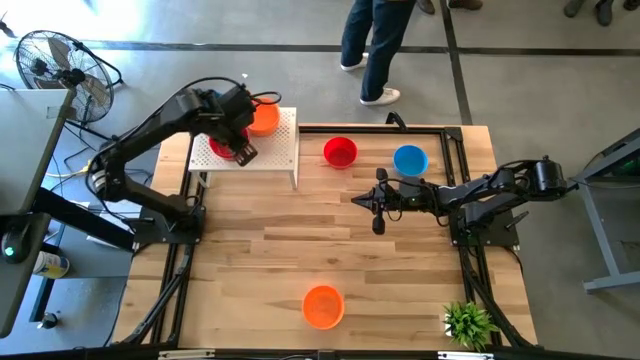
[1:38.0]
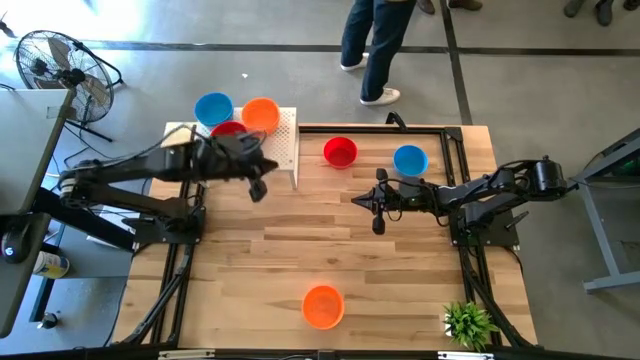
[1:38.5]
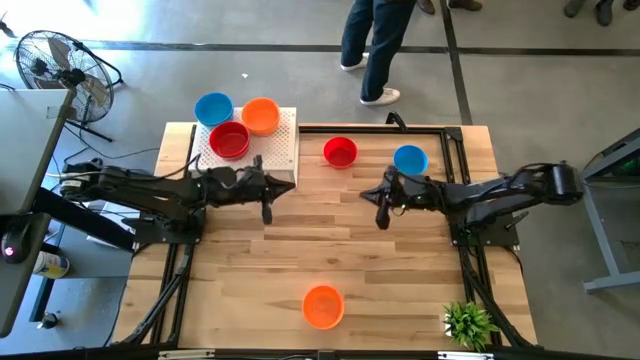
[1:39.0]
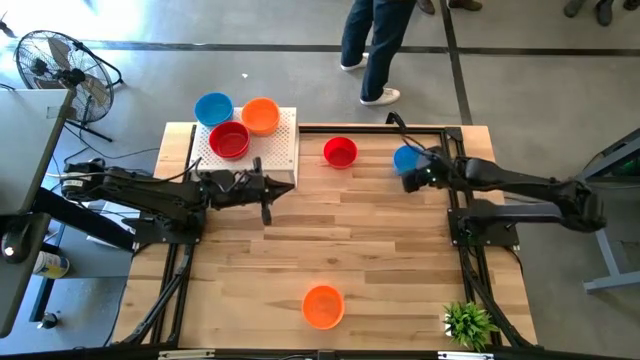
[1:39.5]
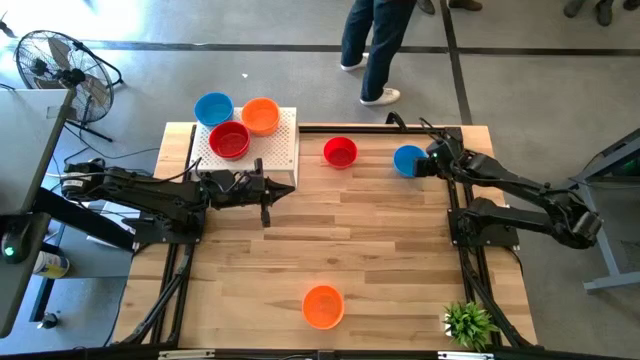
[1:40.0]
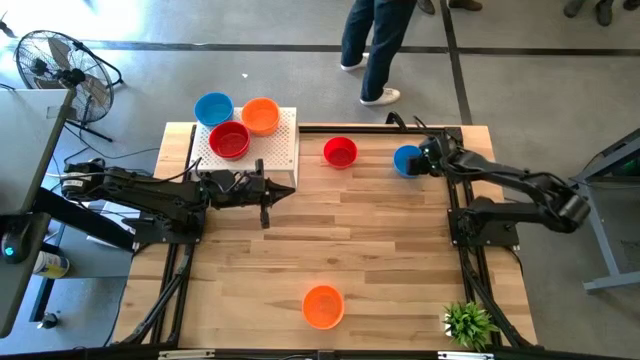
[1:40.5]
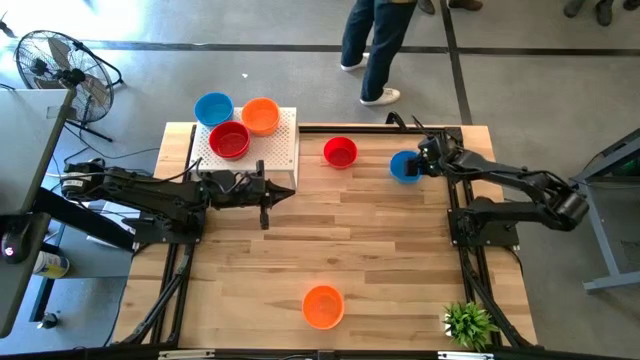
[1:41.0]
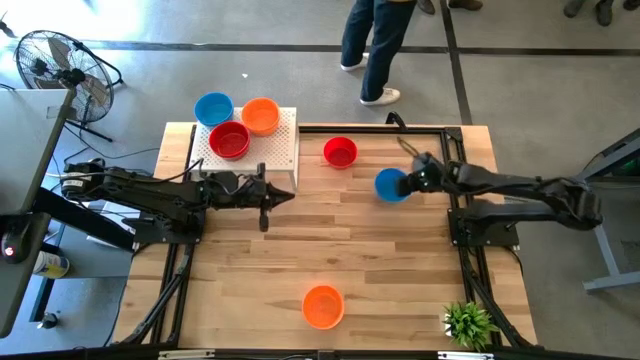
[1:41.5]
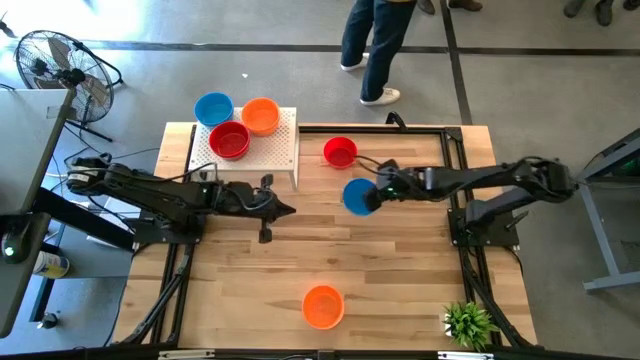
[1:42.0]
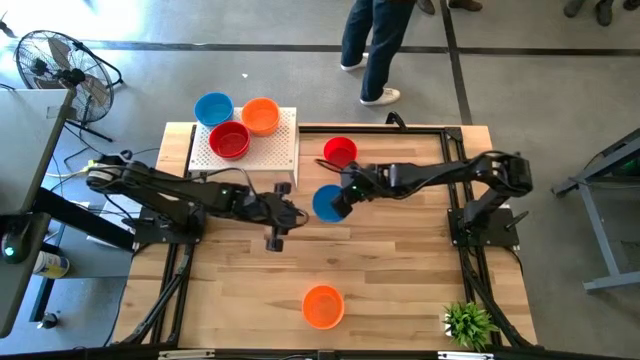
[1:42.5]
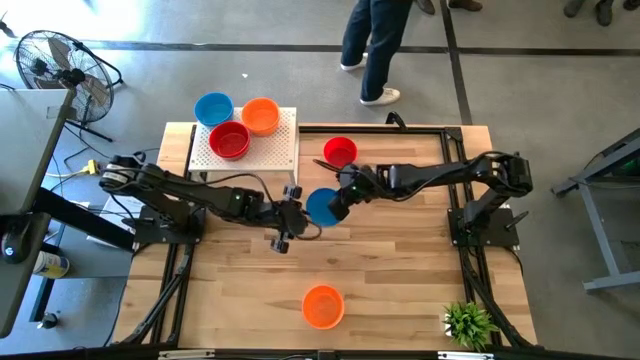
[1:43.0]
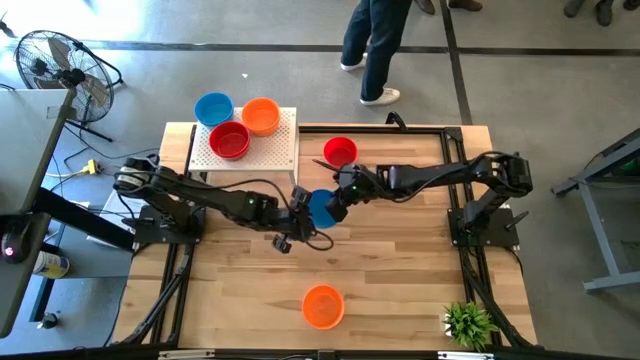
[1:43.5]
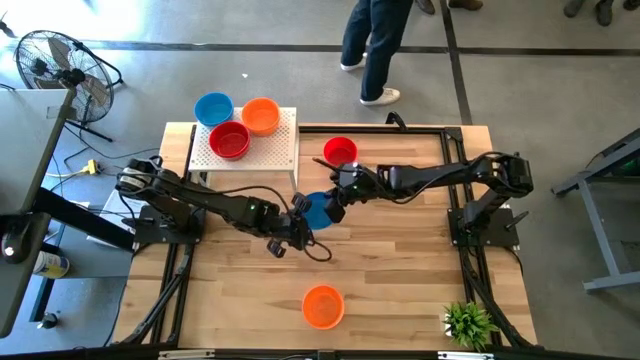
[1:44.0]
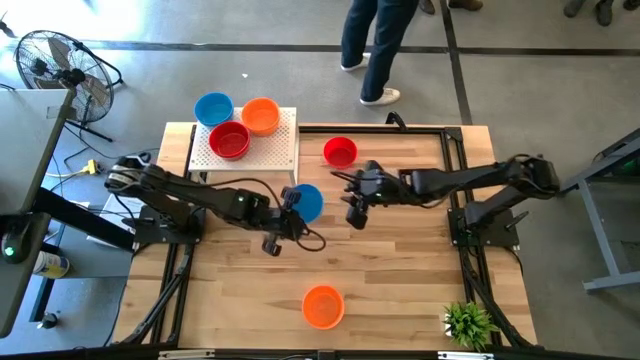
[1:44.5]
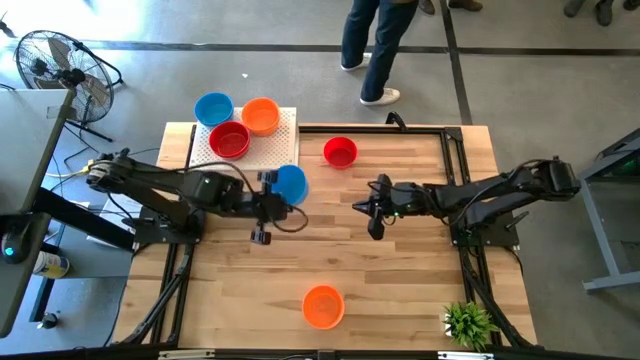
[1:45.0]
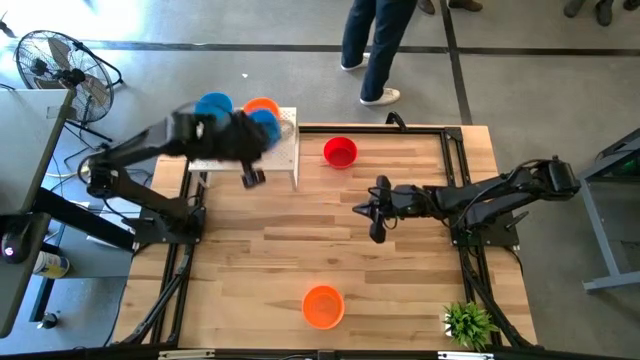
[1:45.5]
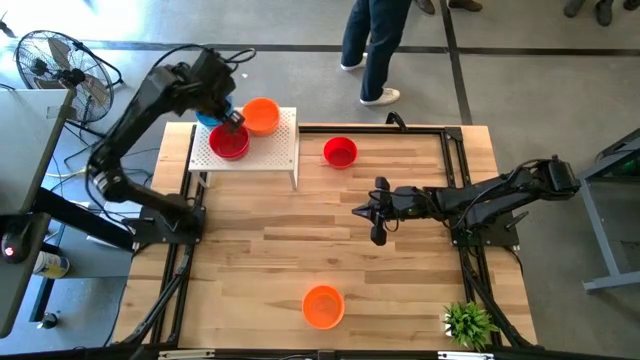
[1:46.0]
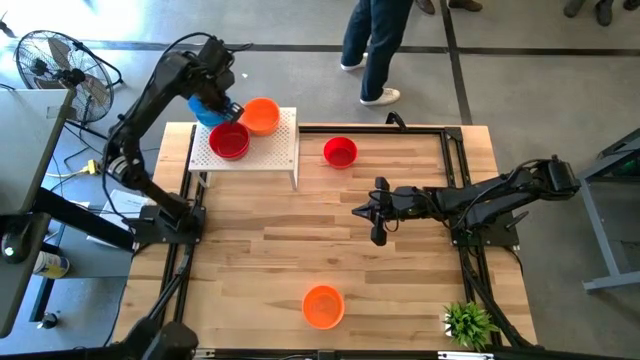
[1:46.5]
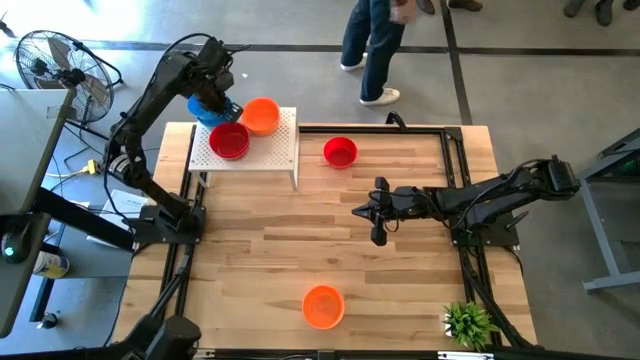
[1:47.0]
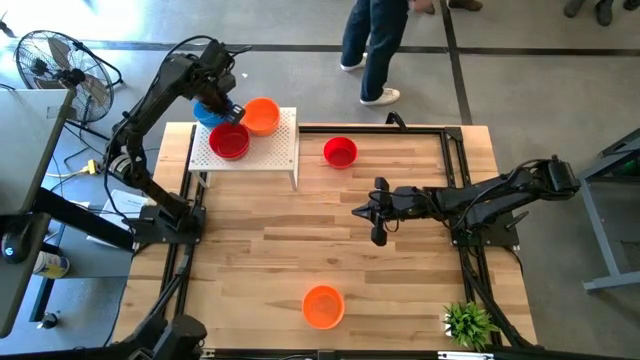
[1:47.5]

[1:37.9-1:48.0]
Task: Pick & Place Mini bowls
Stack the blue bowl on top of the blue bowl on the shelf

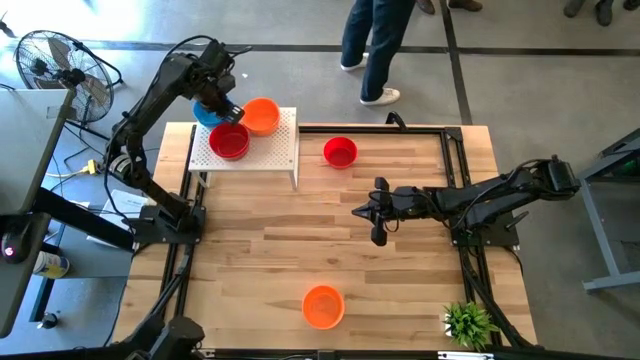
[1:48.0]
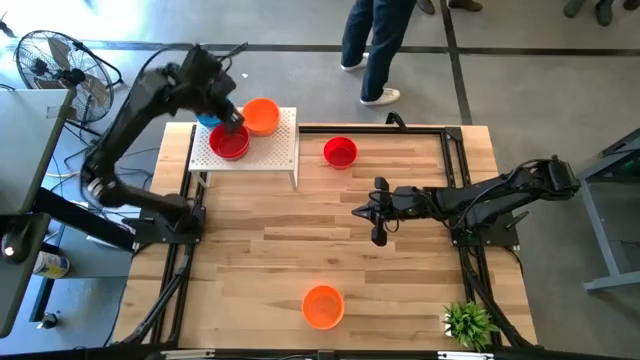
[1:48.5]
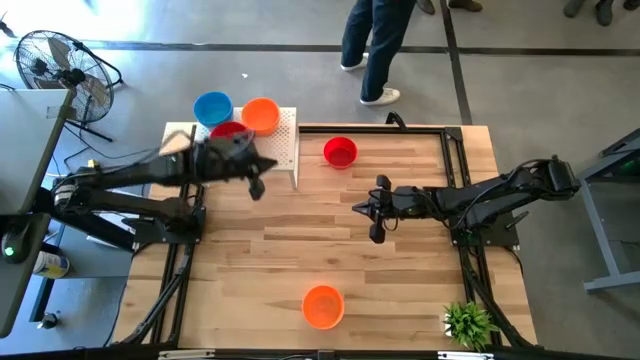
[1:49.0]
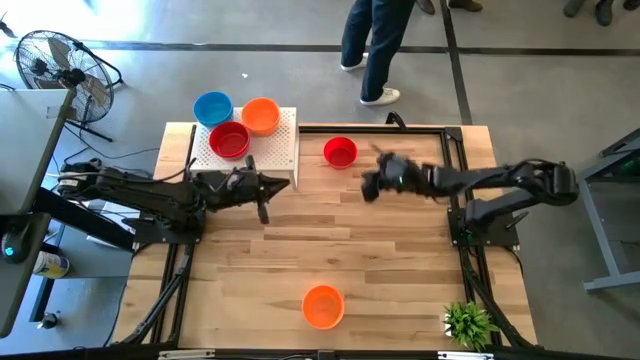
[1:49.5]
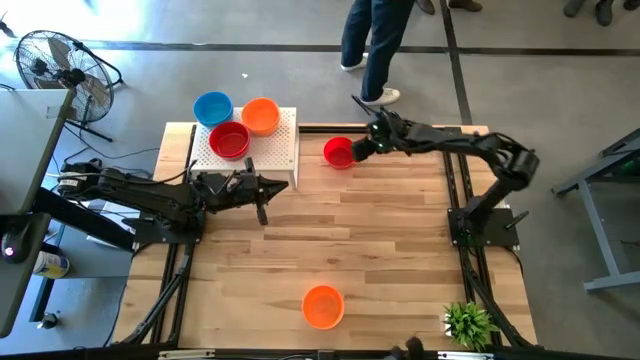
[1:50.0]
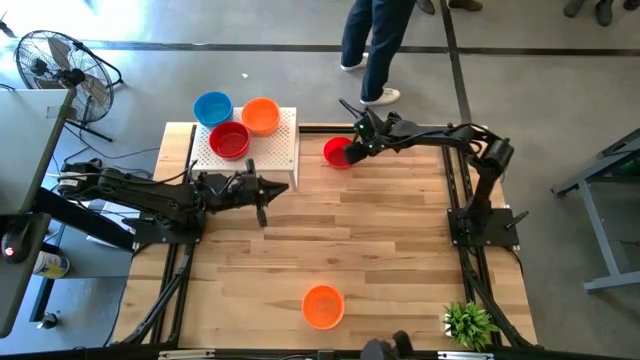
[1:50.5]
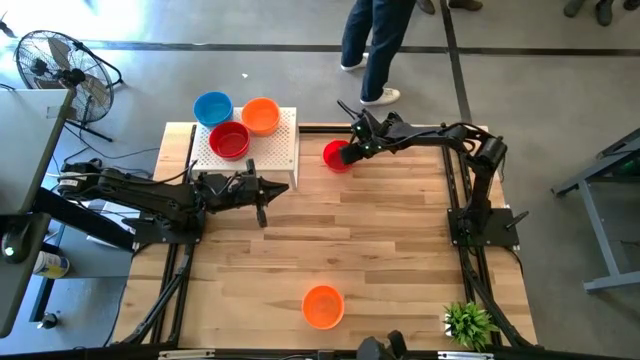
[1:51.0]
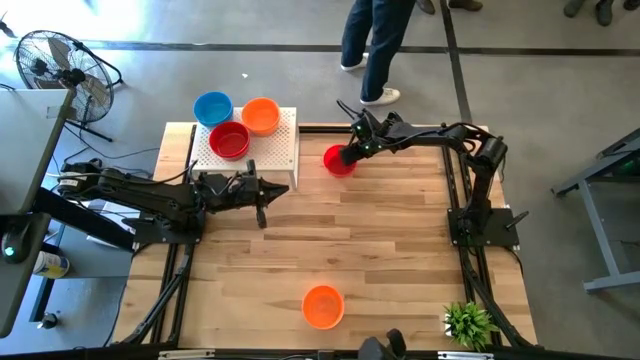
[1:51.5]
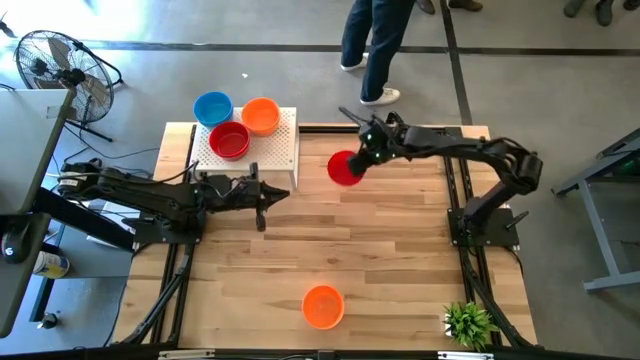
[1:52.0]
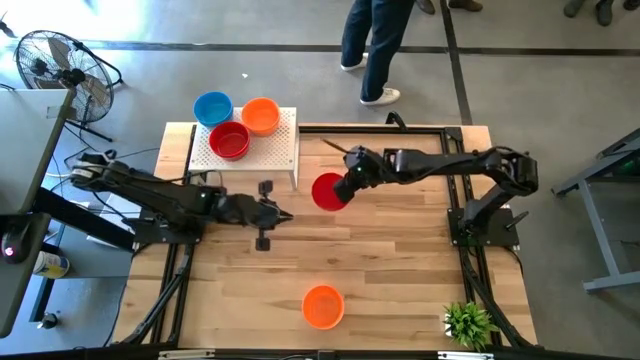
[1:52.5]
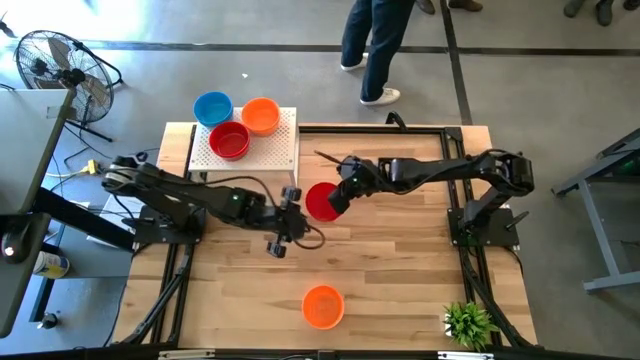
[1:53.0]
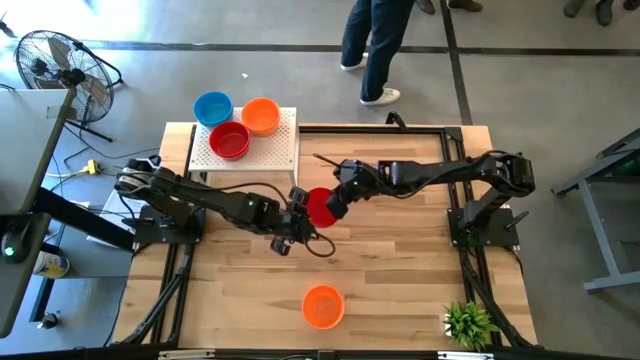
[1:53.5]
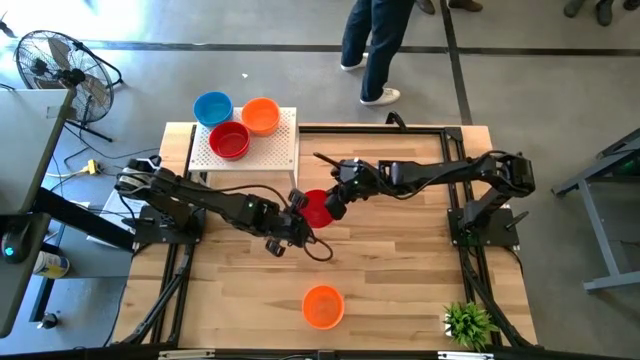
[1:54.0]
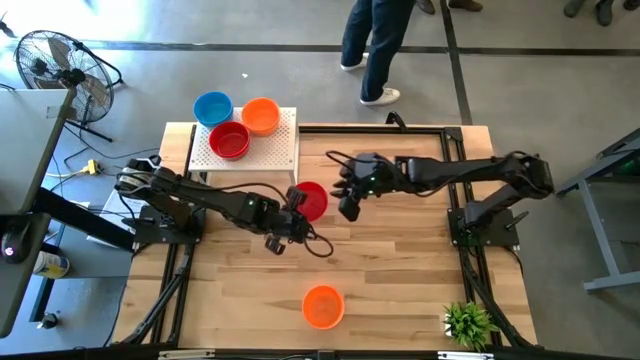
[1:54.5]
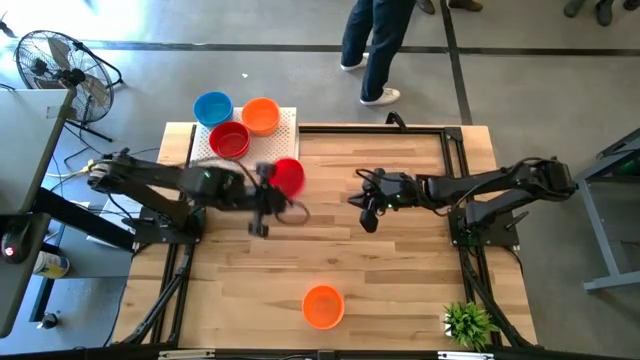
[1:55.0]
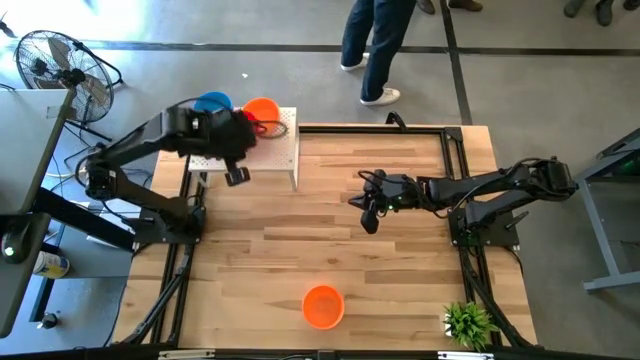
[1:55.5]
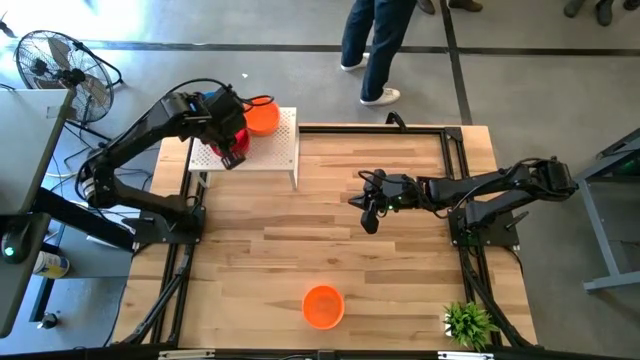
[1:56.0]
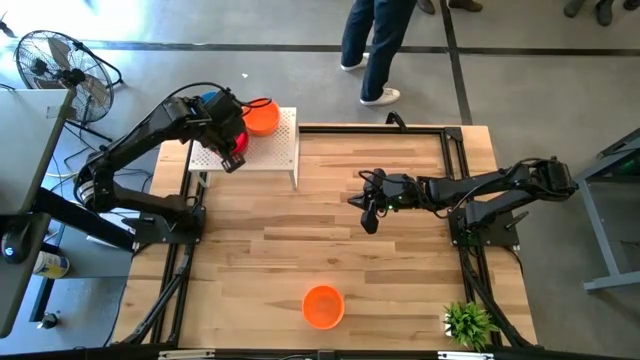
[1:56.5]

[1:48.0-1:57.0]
Stack the red bowl on top of the red bowl on the shelf

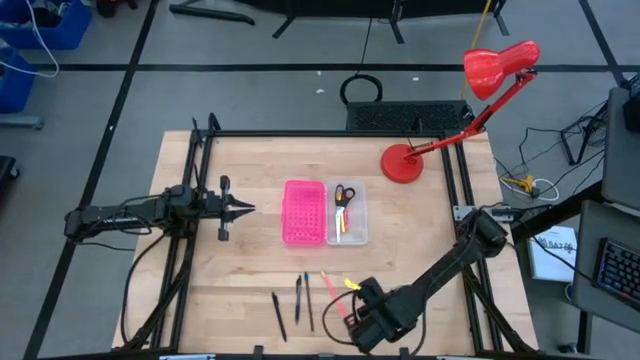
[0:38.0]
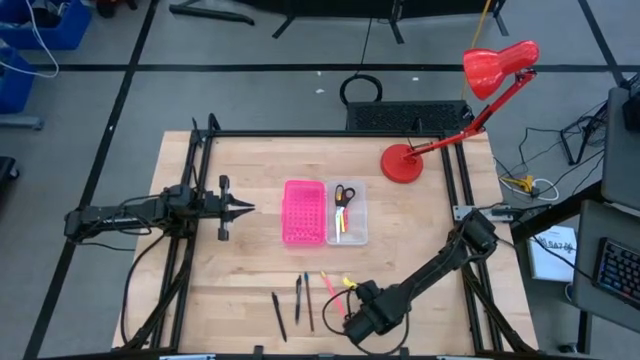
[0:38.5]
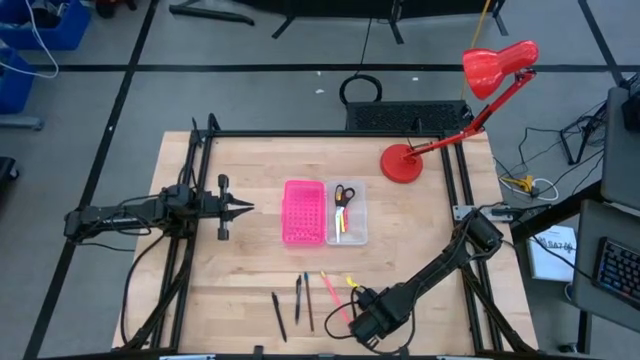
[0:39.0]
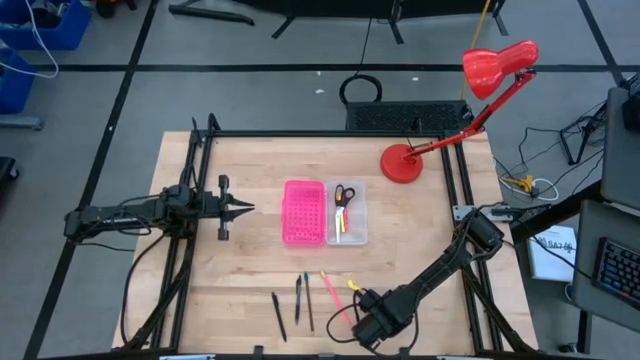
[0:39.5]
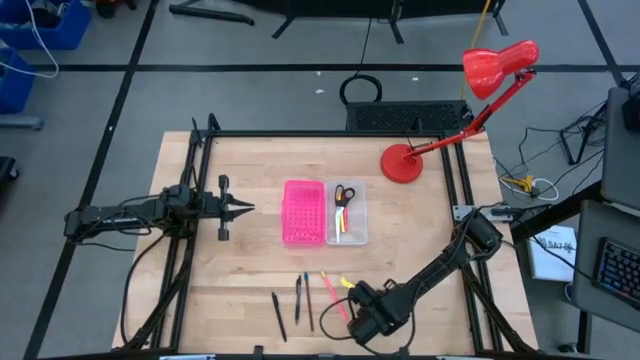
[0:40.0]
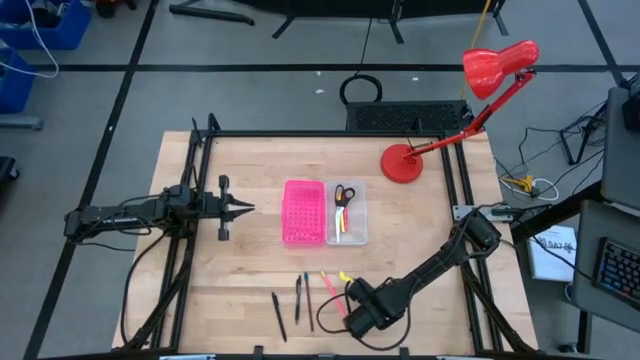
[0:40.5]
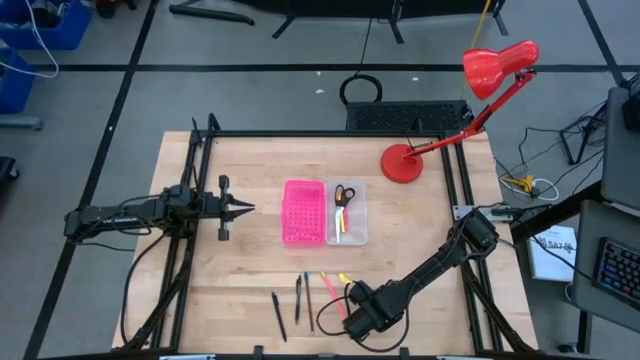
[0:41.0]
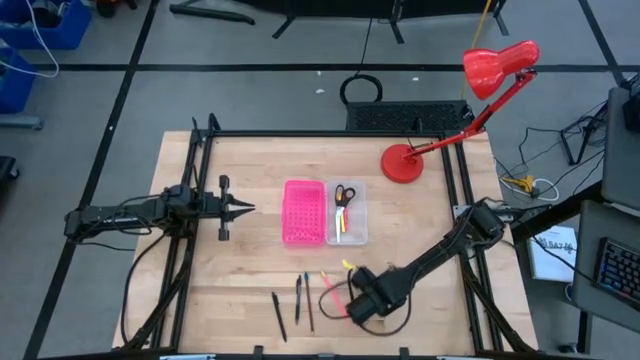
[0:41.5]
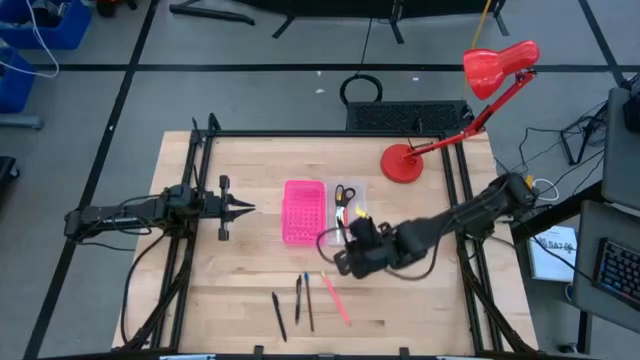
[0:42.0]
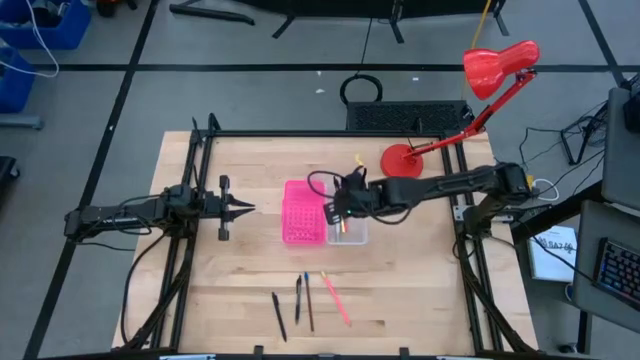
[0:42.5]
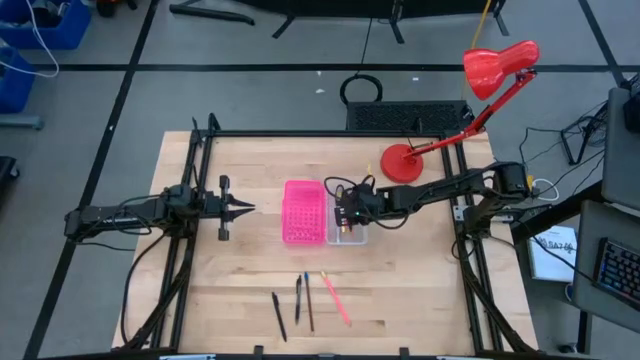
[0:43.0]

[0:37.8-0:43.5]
Task: Pick & place school supplies into a supply box
Put the right transparent black pen into the supply box
